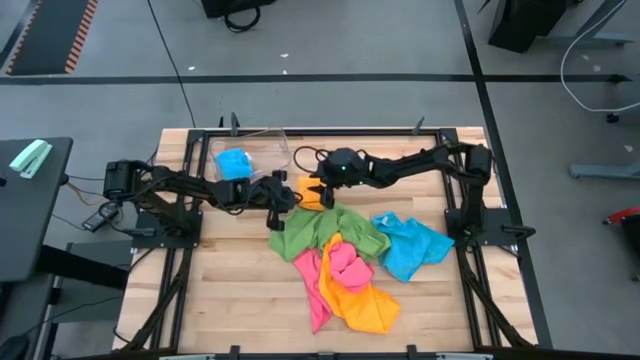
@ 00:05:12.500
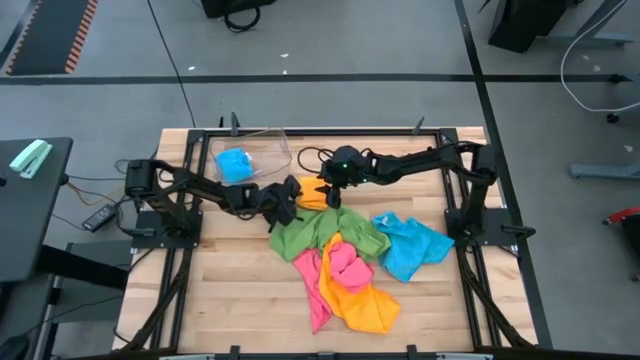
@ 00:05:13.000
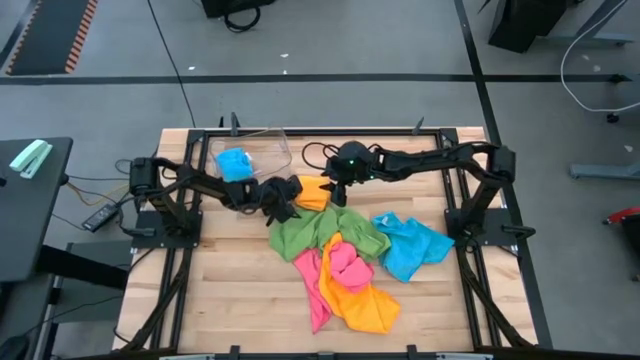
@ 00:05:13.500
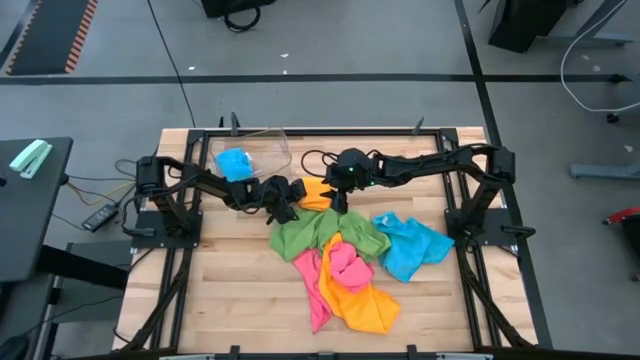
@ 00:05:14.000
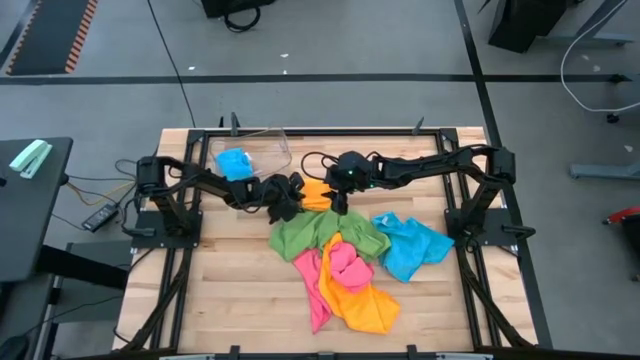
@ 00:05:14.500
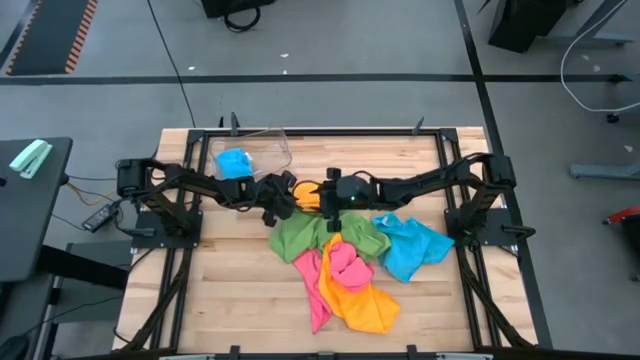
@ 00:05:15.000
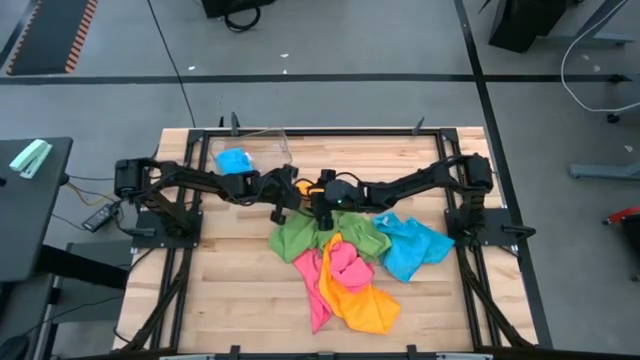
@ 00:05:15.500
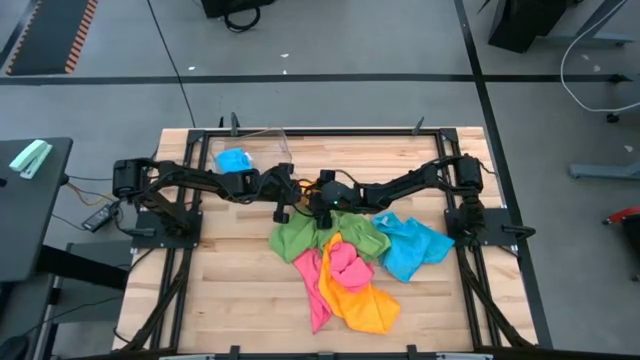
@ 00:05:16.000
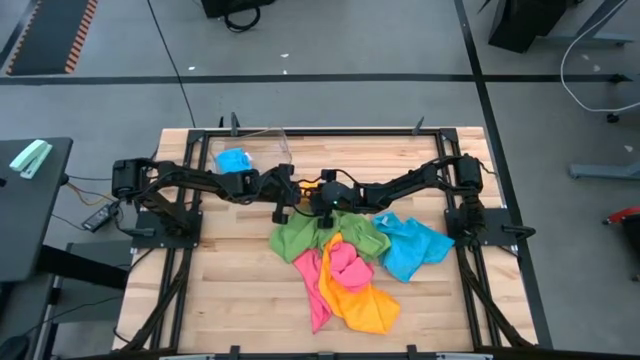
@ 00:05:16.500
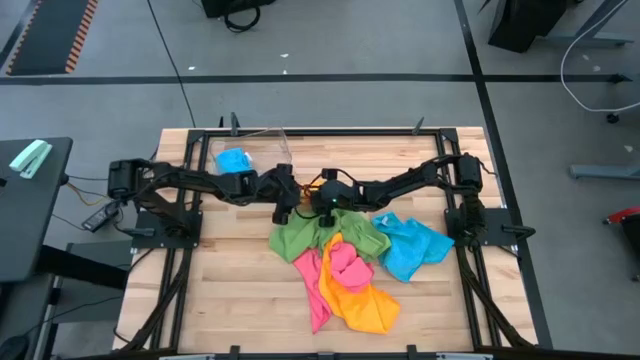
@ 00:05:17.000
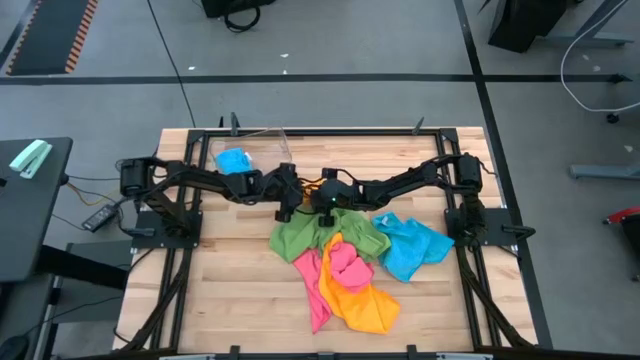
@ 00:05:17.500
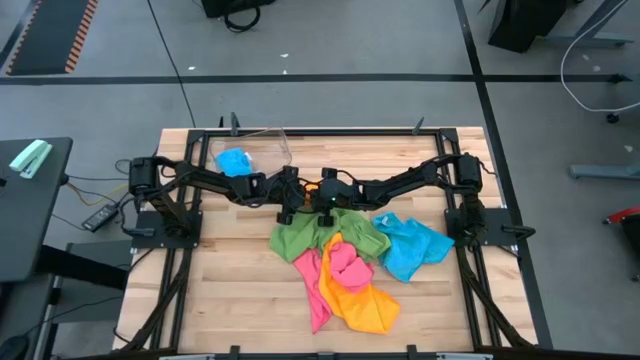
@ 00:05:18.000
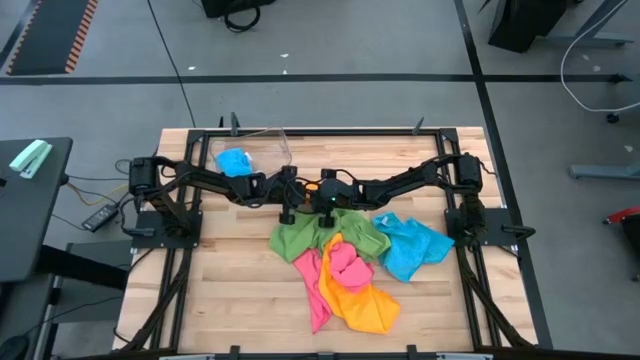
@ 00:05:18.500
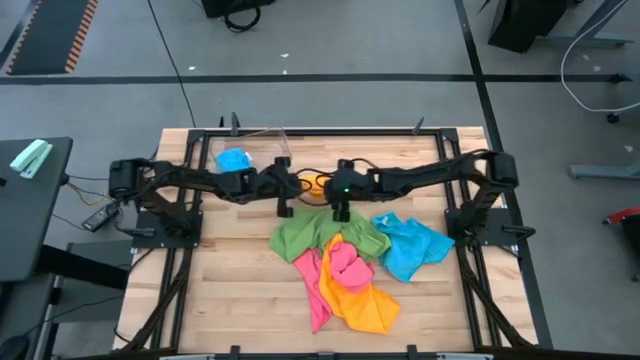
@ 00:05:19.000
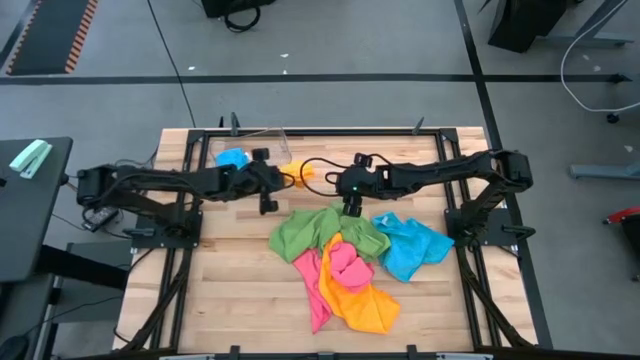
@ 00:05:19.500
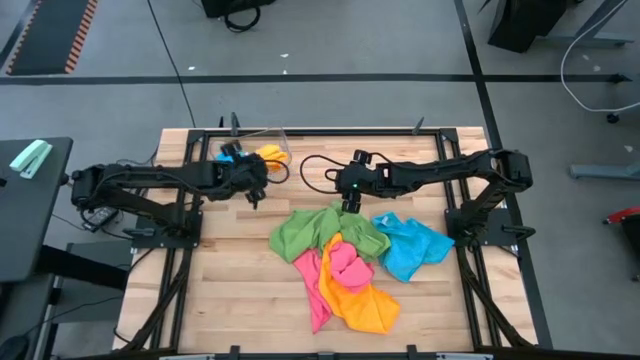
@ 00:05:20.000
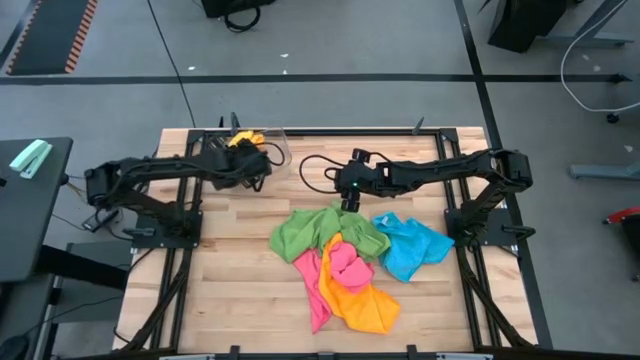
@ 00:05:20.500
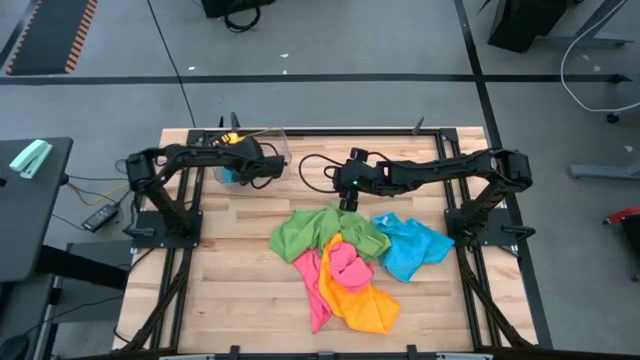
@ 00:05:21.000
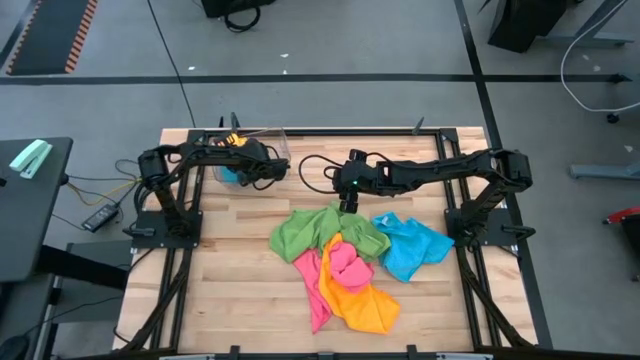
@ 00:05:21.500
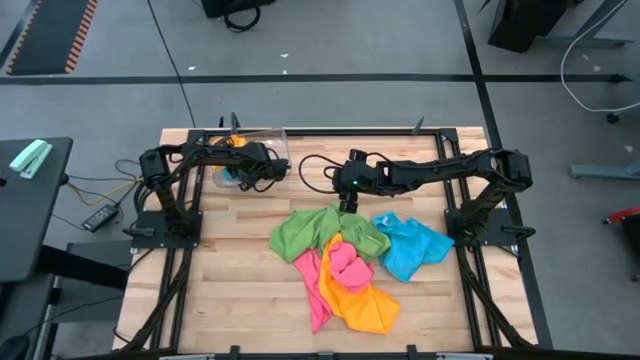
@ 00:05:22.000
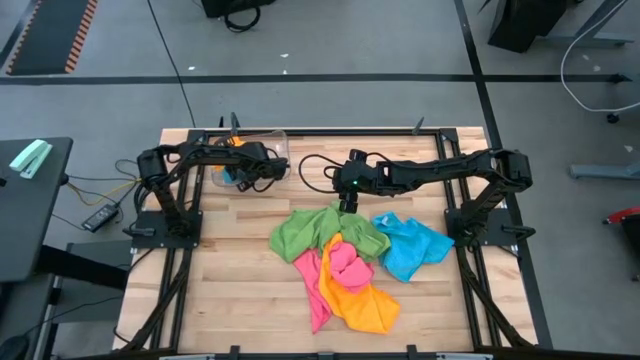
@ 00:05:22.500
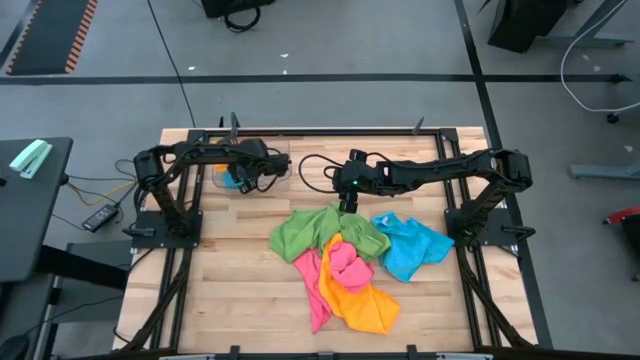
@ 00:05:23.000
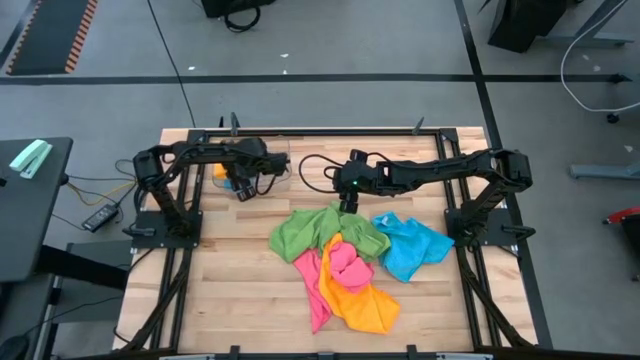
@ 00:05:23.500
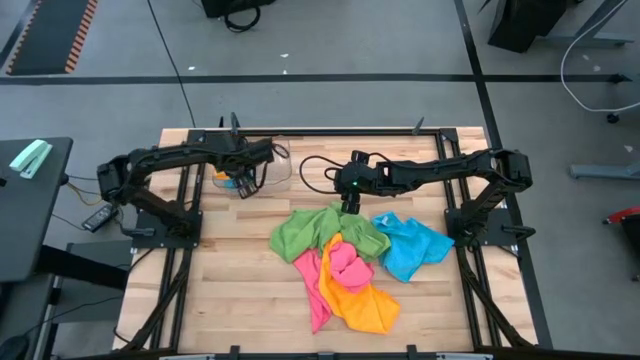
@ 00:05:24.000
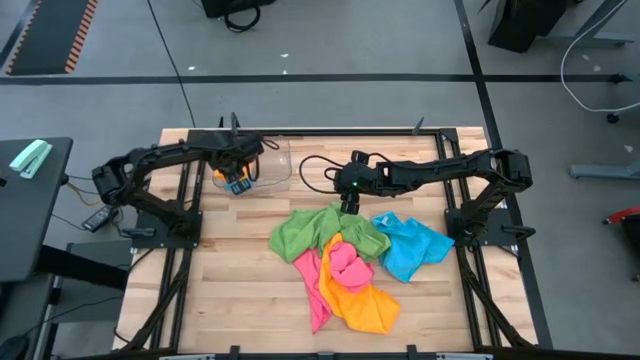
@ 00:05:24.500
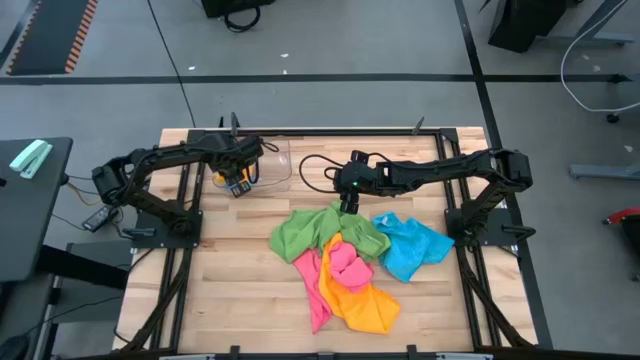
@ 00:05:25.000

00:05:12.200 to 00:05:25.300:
Task: Fold microfiber towels
Stack the top orange microfiber towel on top of the blue microfiber towel

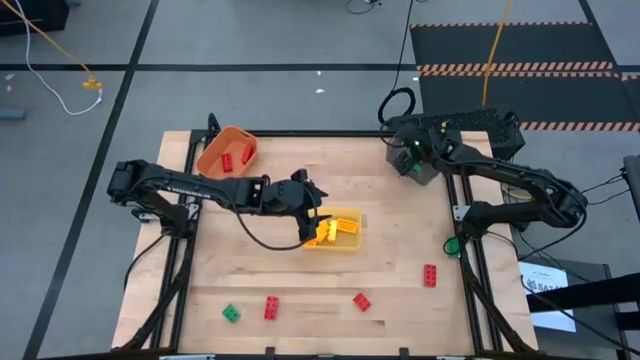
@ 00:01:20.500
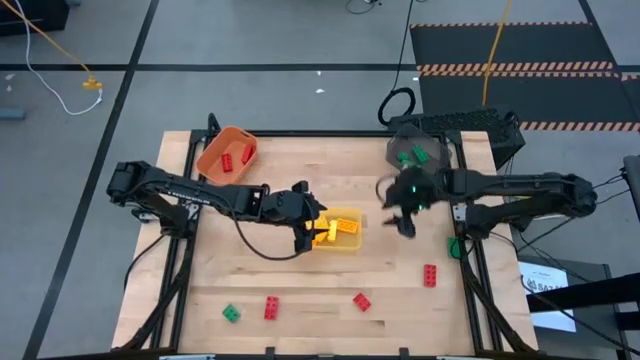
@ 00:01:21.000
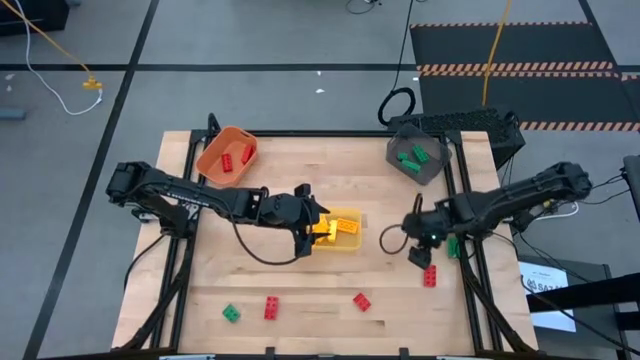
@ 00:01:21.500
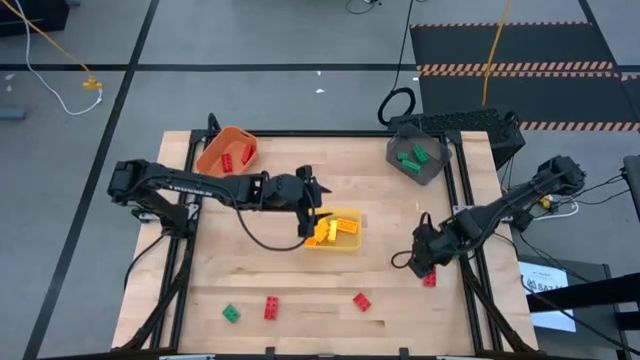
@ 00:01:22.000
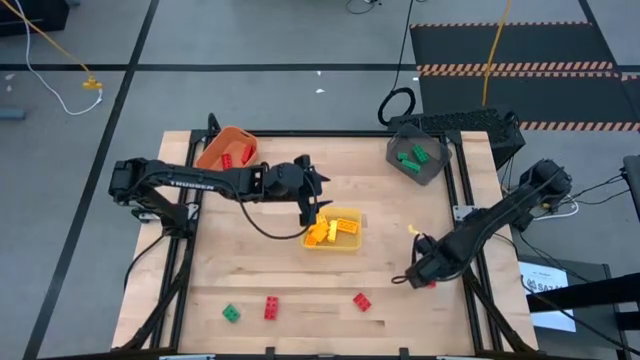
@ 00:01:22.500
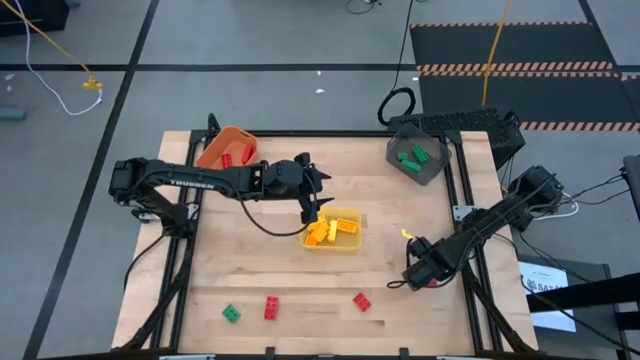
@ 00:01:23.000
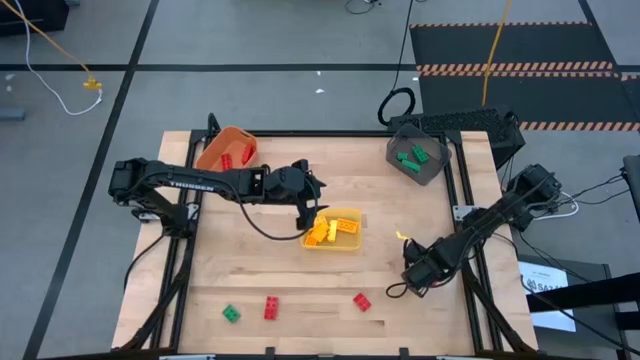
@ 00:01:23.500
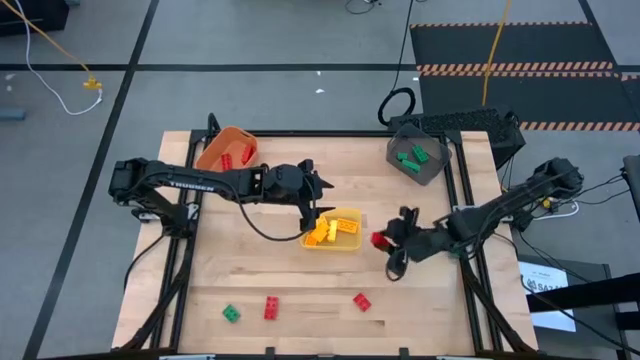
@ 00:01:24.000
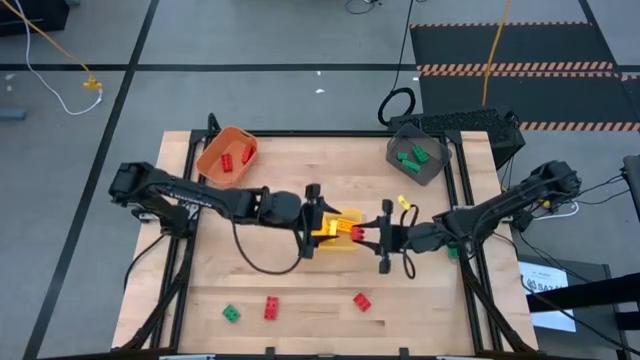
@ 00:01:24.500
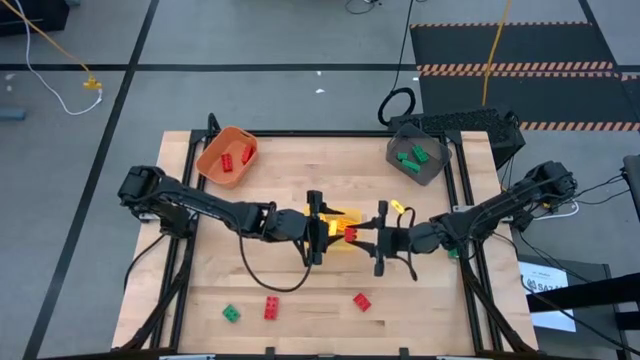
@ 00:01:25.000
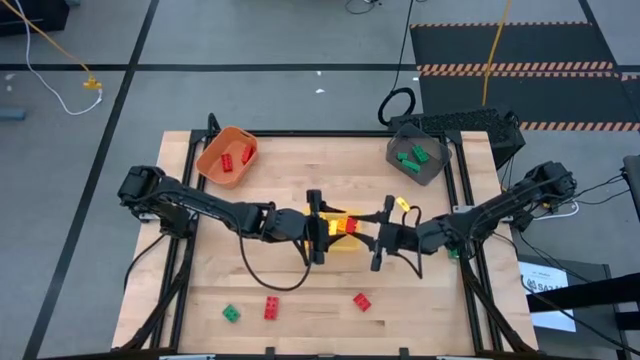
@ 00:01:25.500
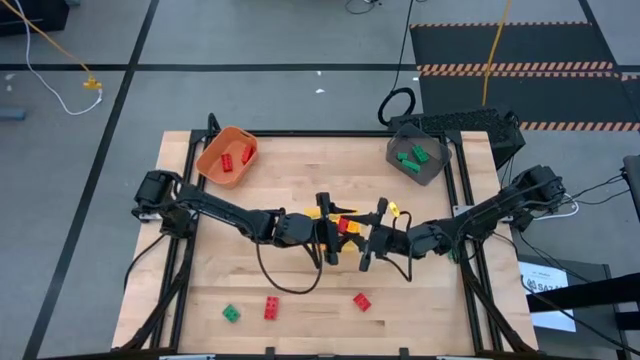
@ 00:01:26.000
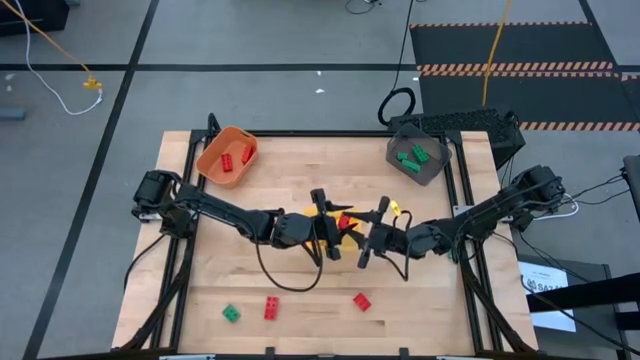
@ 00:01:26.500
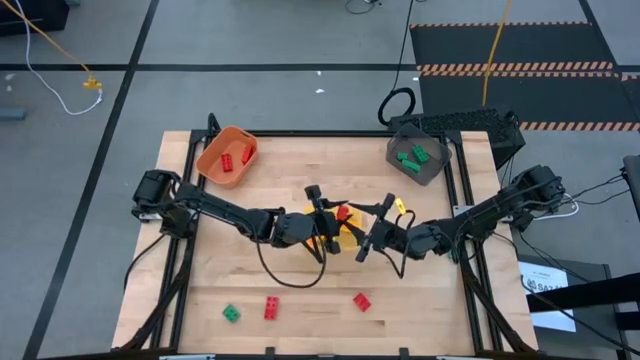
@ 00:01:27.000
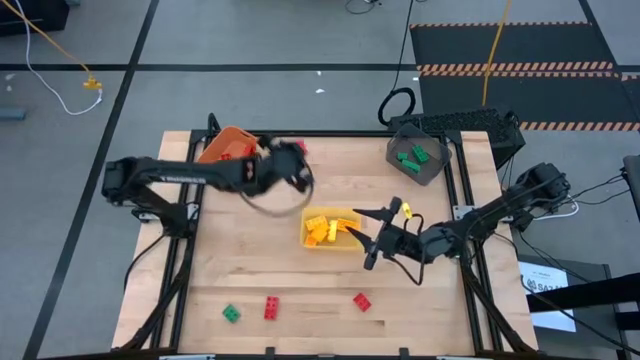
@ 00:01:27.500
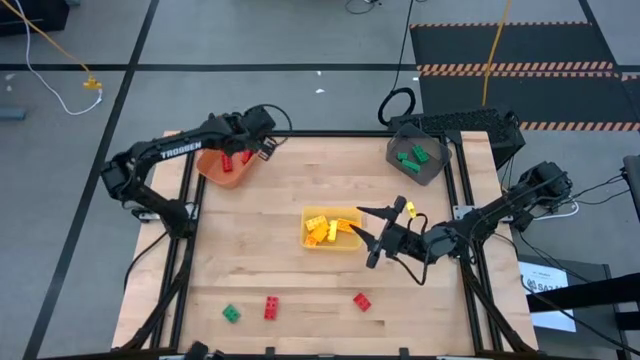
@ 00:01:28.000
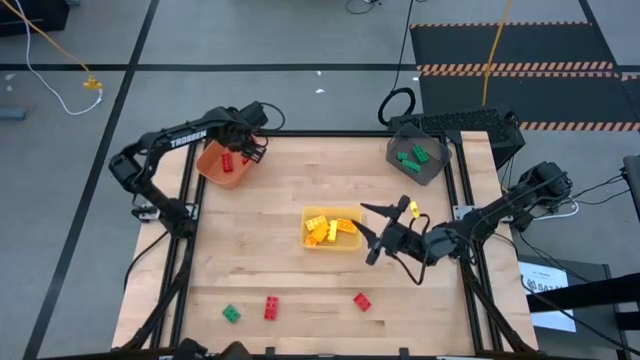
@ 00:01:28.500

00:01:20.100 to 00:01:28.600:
Task: Sort & place blocks by color
Put the right red 8-stud game piece into the orange bin
